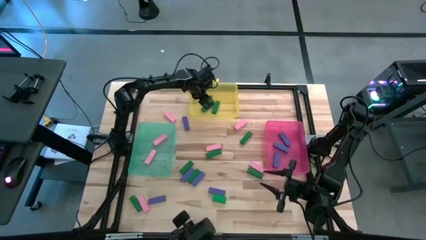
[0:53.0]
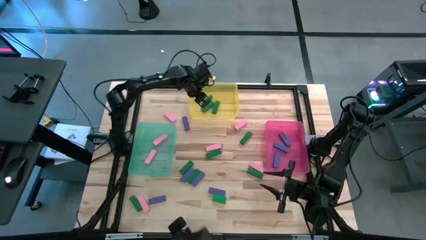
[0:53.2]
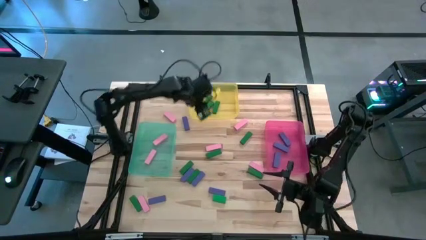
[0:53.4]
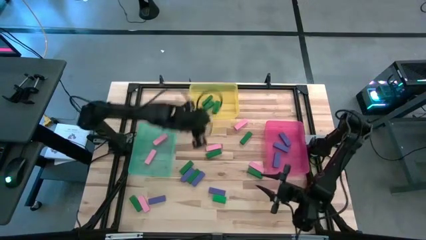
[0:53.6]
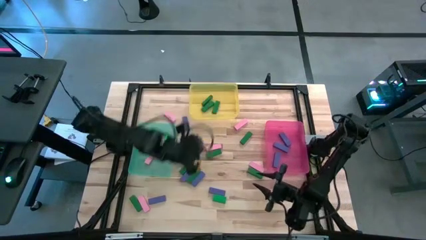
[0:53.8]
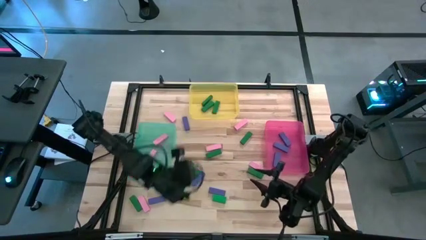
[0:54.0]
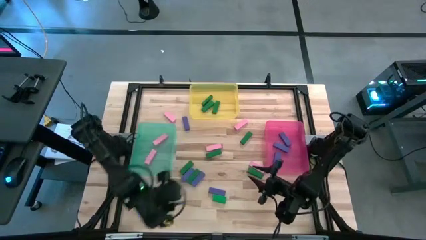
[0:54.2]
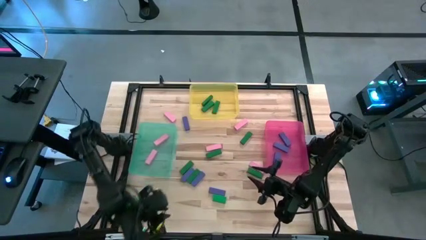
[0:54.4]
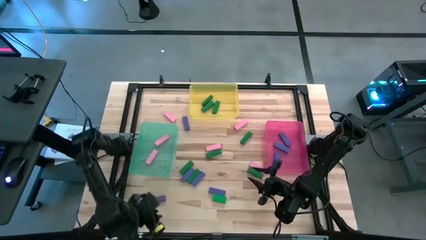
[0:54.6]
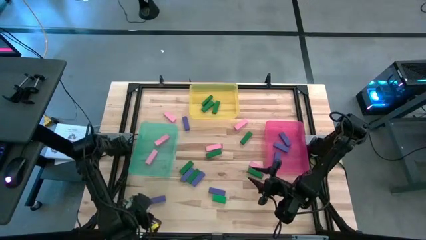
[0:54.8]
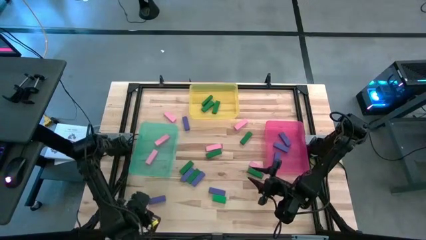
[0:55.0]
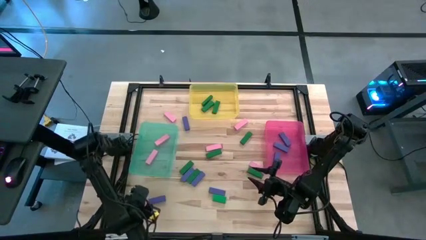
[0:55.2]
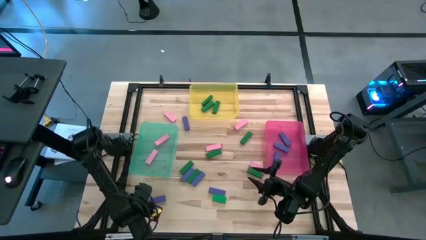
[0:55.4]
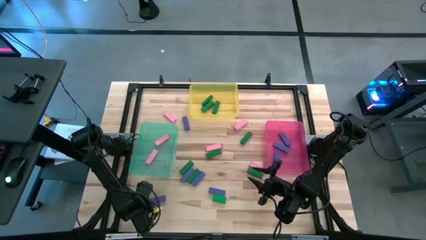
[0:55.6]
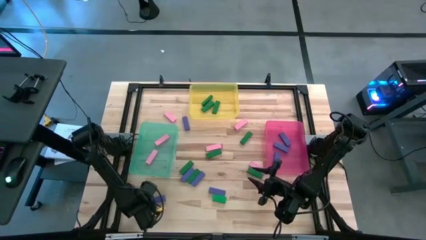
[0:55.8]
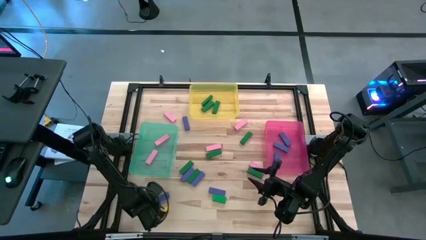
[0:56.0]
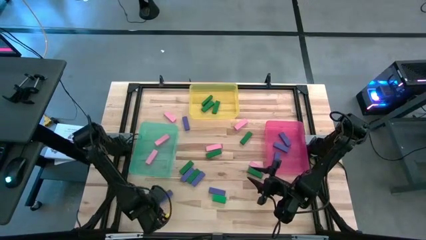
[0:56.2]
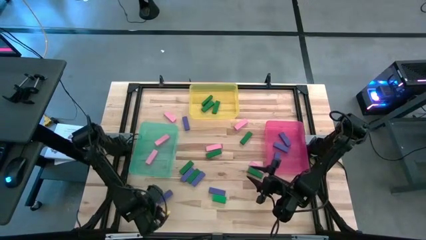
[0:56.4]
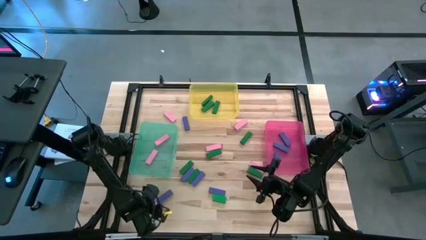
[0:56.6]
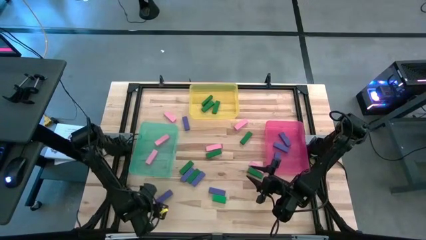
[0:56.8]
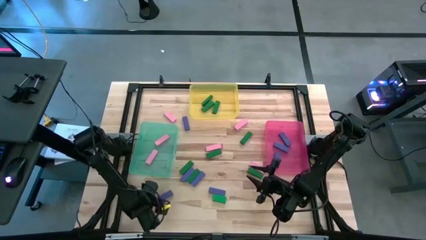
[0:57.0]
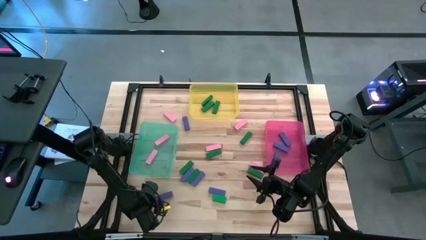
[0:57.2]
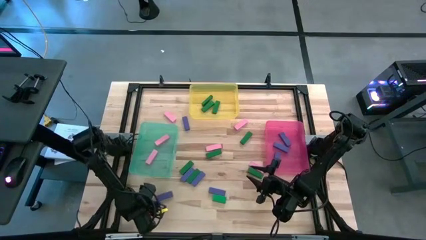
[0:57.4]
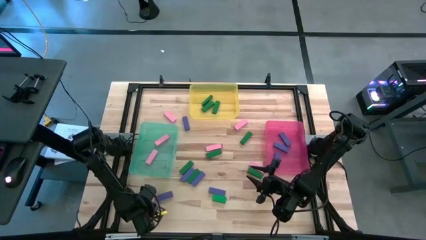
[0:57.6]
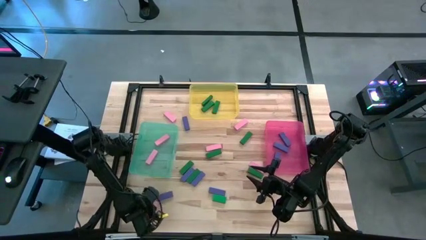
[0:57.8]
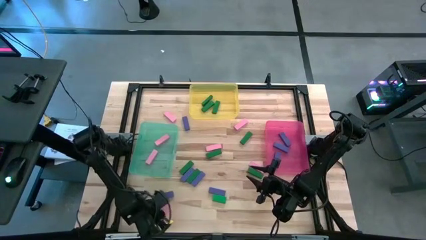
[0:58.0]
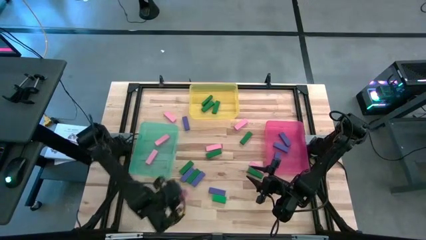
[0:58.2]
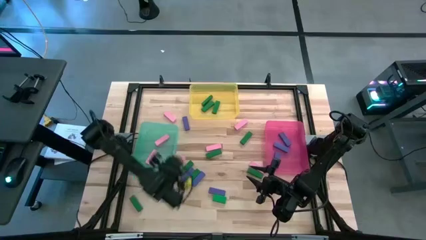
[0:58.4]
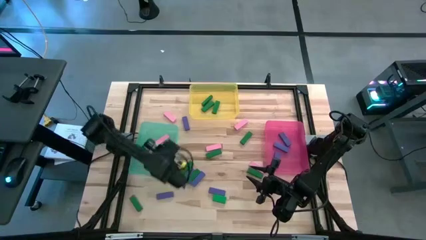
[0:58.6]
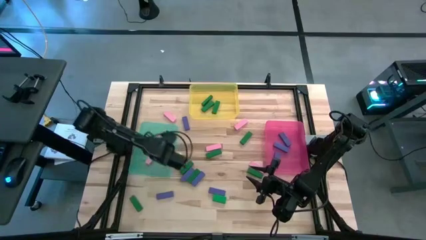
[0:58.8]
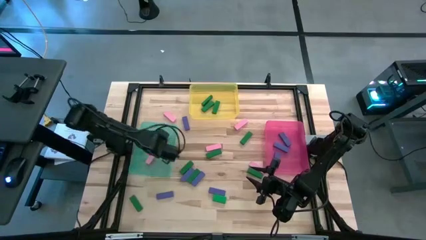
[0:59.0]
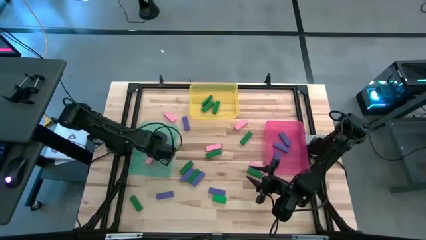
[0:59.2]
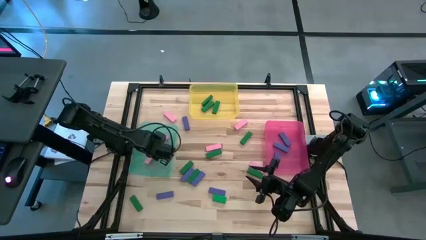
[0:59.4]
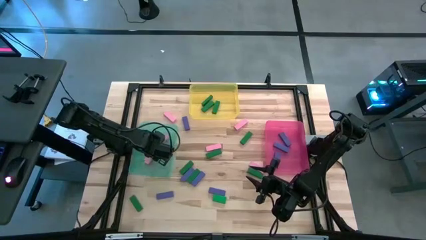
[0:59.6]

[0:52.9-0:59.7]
Task: Sort blocks
Put the pink block into the blue bin

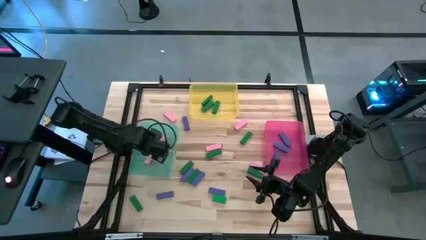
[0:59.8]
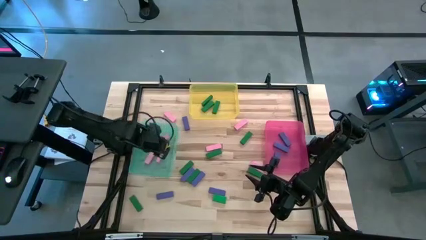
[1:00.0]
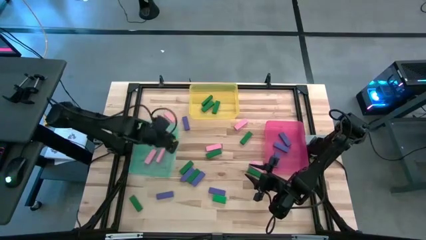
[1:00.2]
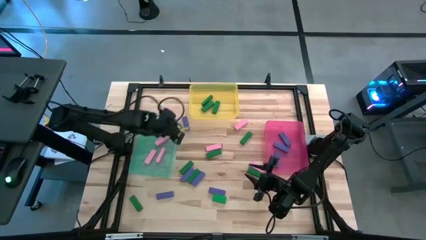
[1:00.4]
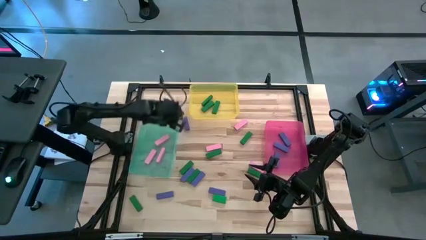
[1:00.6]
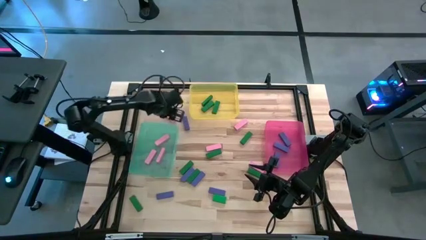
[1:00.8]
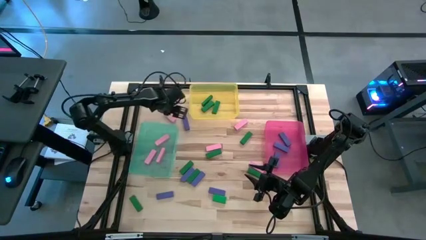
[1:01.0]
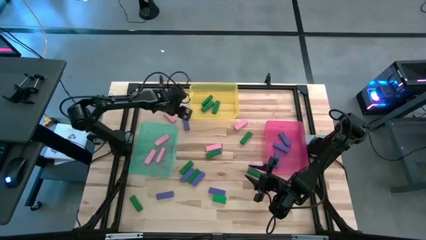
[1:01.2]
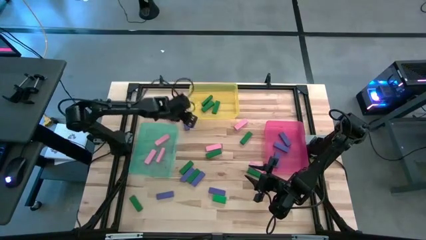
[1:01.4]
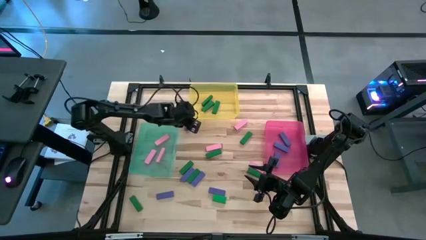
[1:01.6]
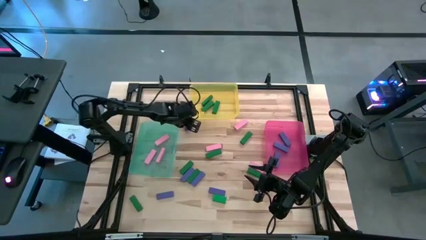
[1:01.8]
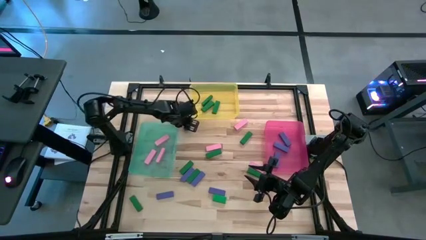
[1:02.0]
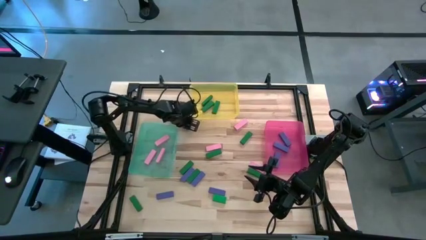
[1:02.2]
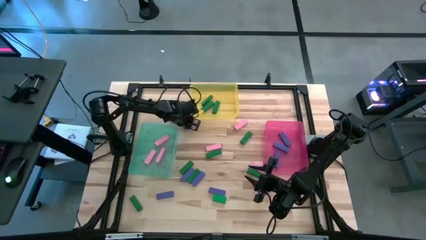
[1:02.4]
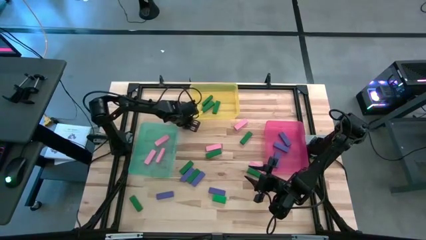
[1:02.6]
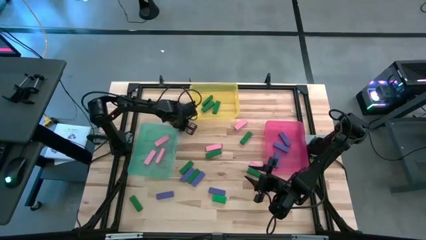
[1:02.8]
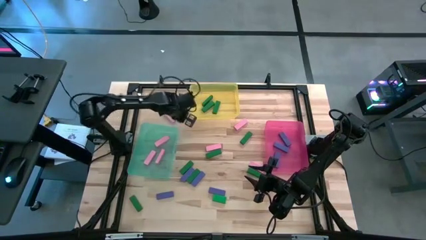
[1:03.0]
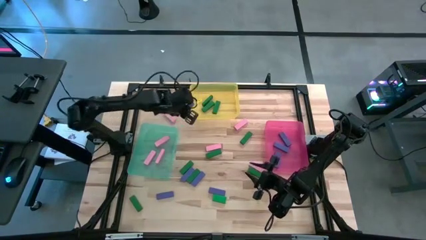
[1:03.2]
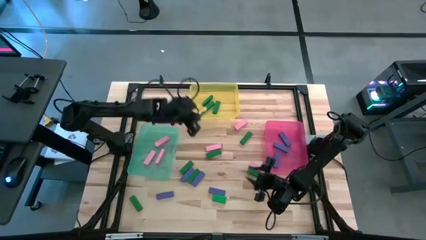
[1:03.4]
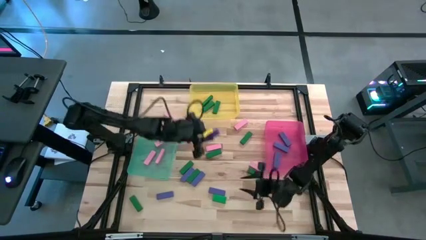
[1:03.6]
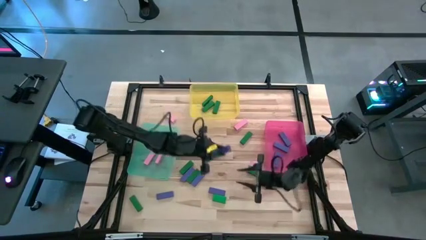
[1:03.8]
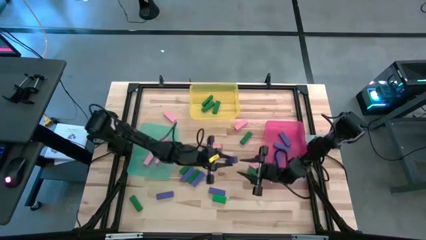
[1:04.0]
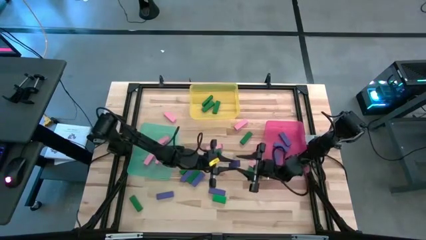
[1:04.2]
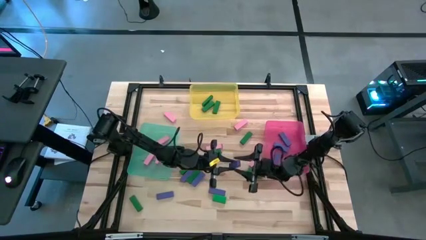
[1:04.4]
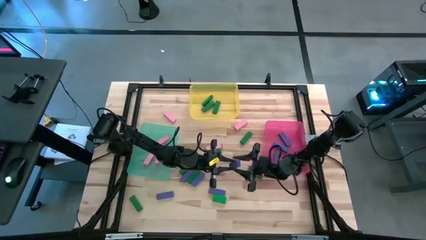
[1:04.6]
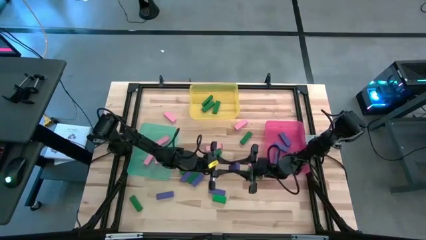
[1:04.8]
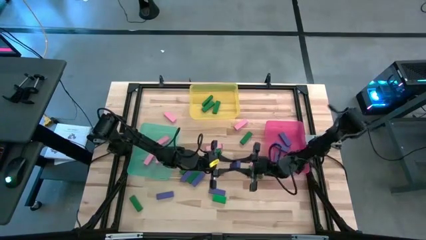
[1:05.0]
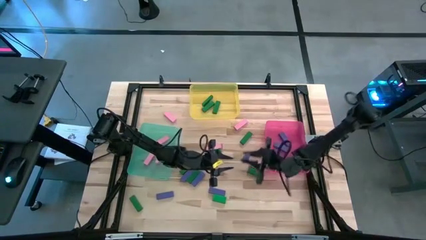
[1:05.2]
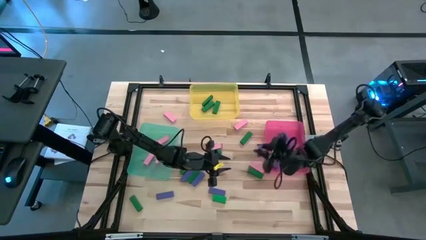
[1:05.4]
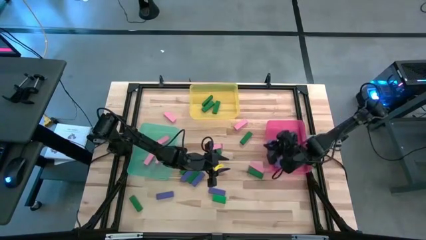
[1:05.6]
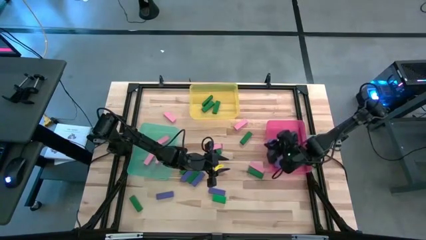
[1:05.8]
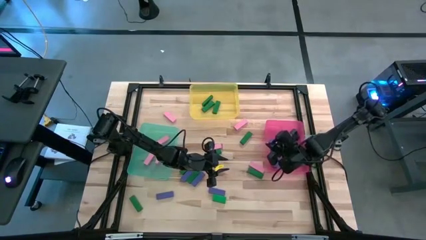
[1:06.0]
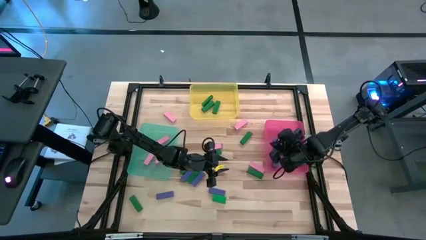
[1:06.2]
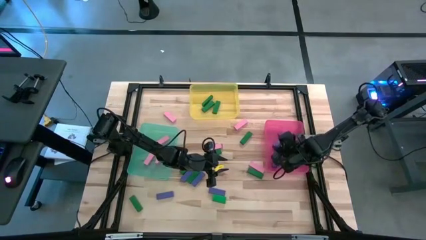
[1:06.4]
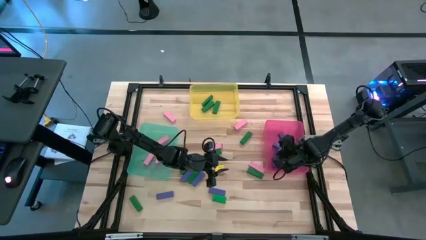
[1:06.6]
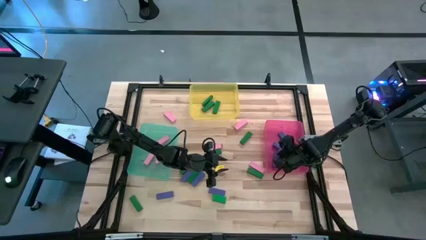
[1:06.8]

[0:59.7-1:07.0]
Put the blue block into the pink bin

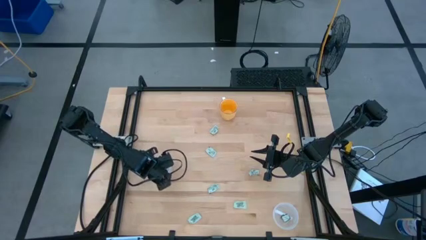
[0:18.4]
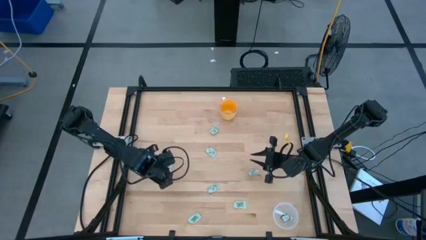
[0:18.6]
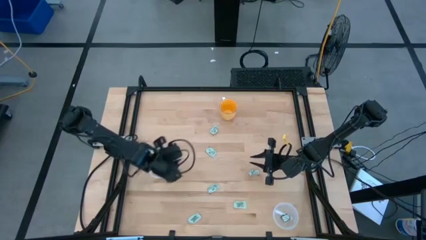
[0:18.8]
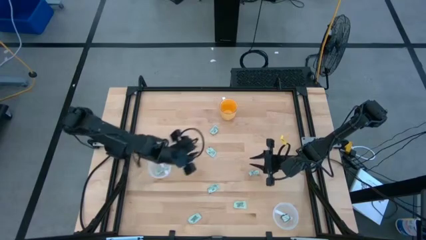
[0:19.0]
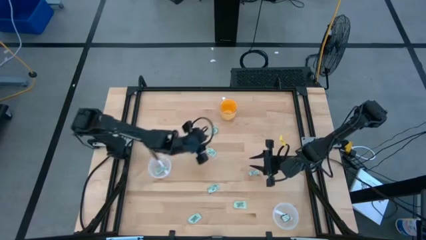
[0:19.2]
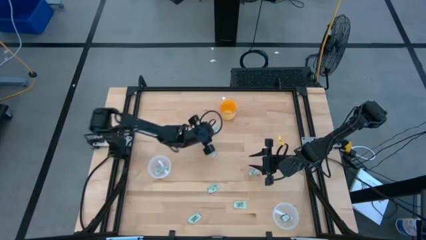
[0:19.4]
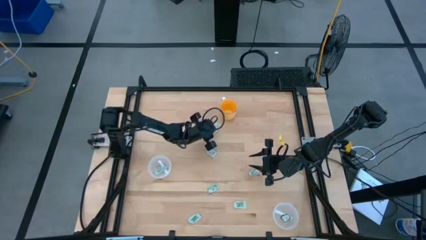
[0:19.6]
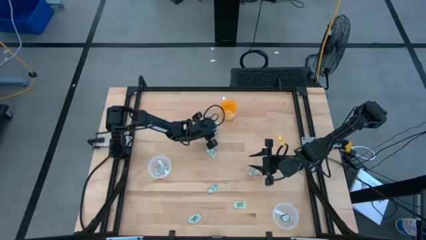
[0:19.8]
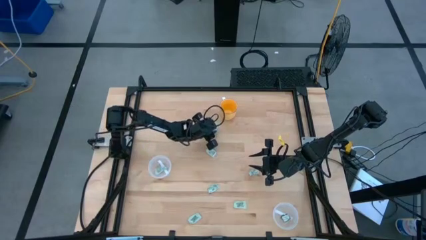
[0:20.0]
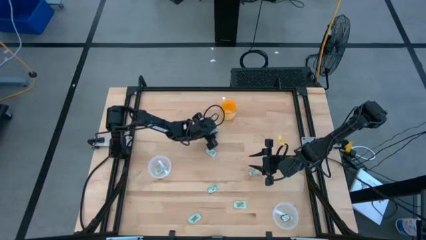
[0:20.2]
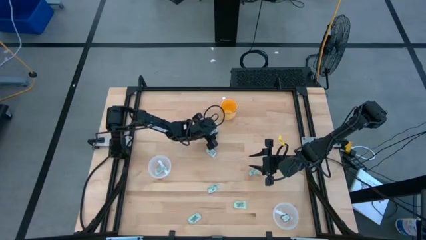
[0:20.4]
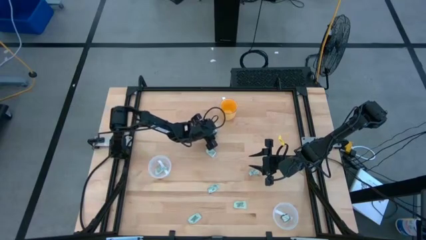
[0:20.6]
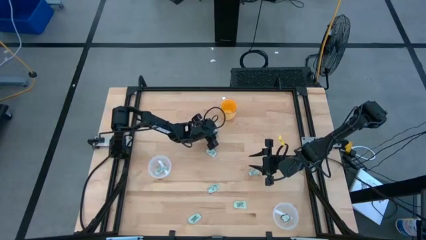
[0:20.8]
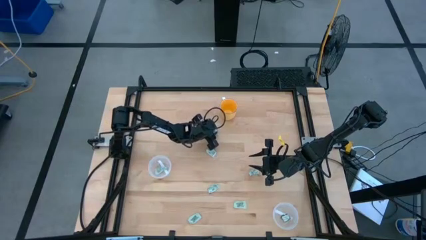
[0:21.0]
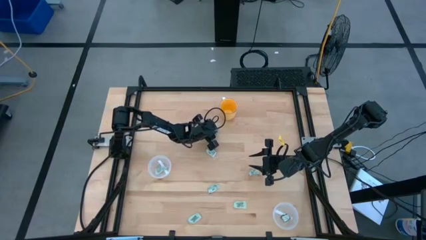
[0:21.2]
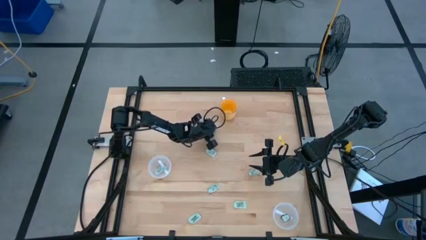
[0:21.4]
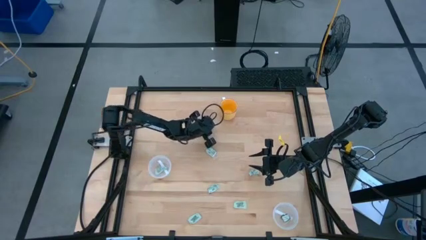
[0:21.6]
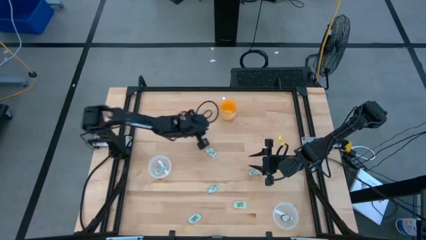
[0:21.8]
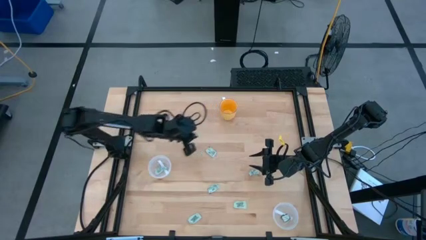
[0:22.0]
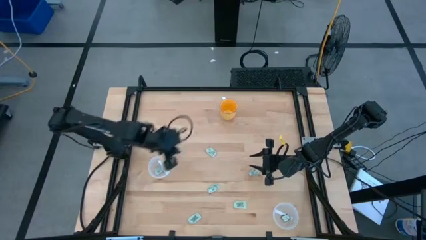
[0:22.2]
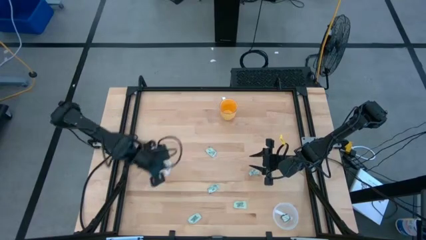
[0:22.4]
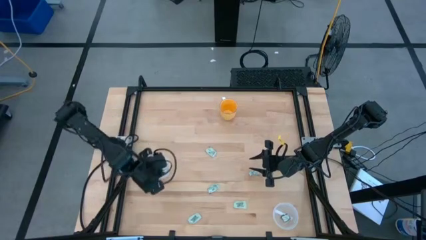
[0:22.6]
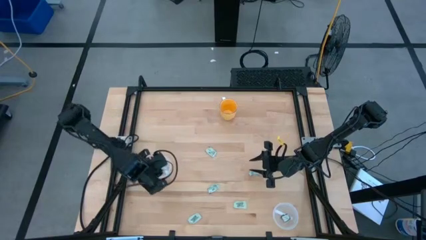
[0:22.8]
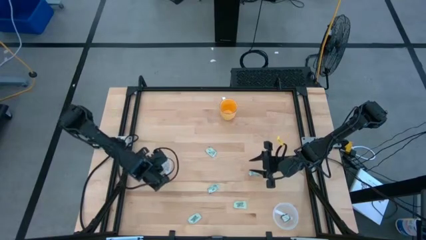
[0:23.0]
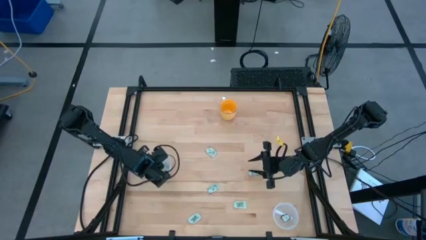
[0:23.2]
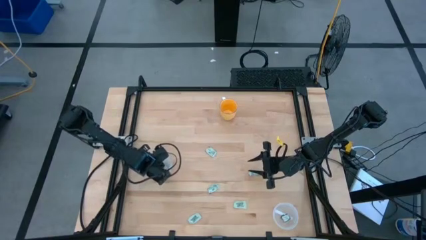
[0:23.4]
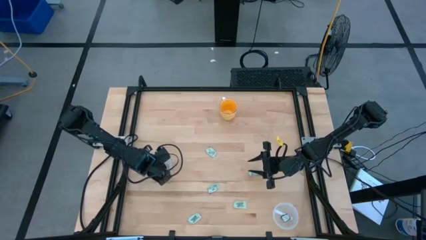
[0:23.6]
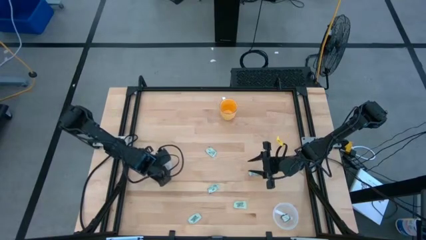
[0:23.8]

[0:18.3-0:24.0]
Task: Pick and place Stevia / Truvia into bins
Put the light green stevia packet into the left transparent container
